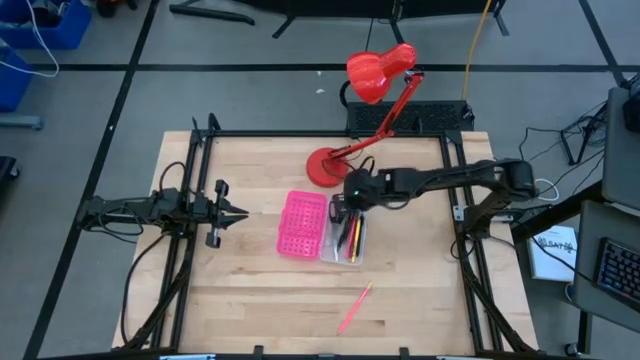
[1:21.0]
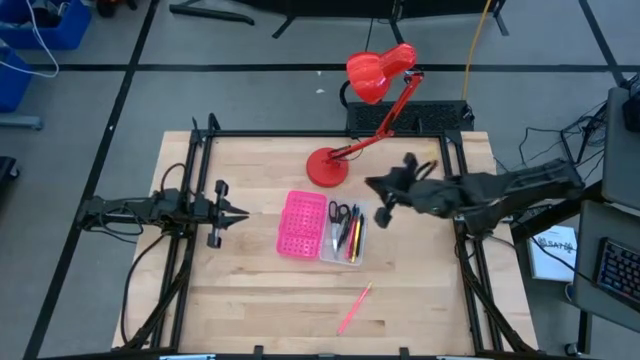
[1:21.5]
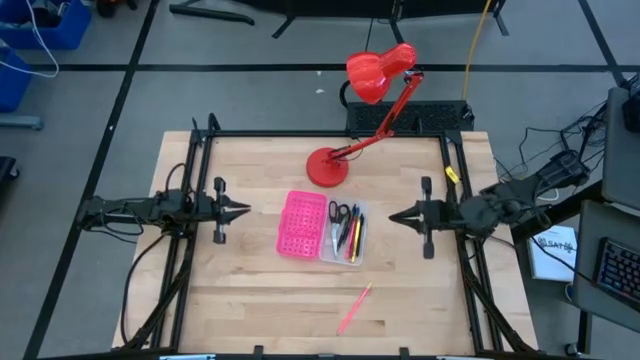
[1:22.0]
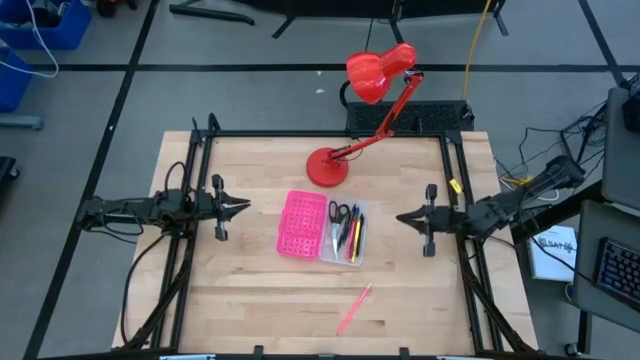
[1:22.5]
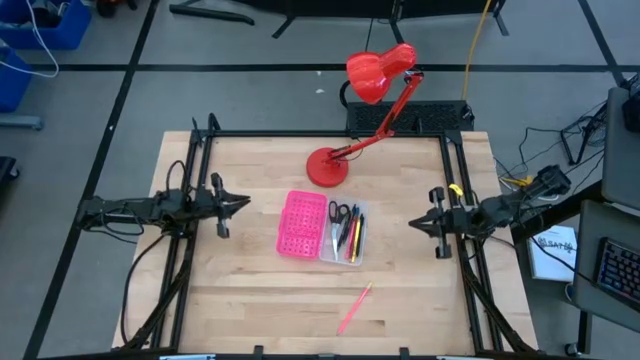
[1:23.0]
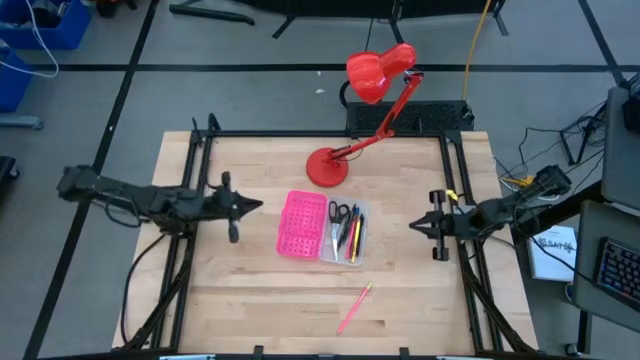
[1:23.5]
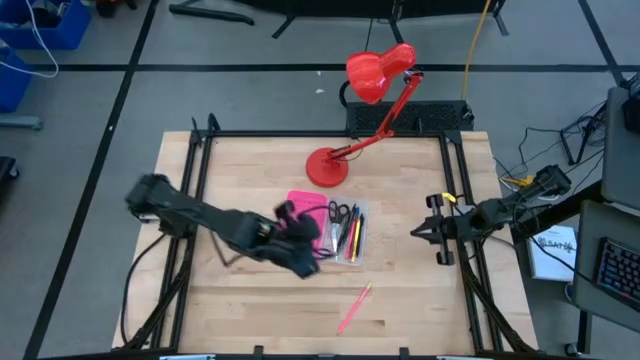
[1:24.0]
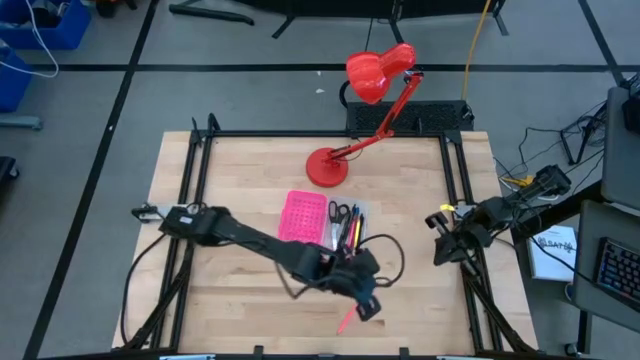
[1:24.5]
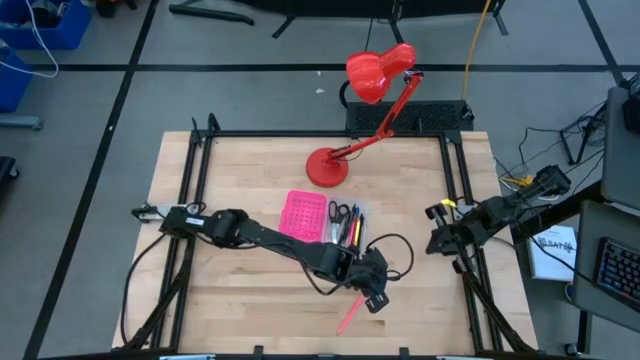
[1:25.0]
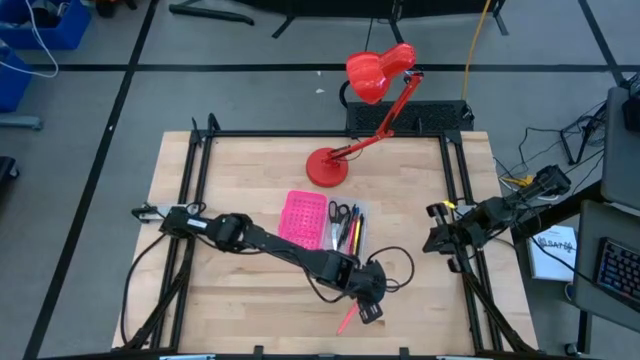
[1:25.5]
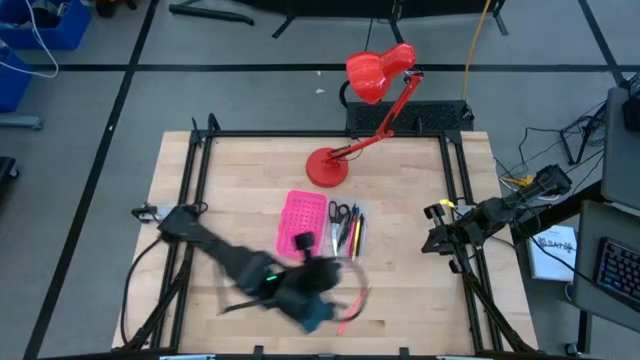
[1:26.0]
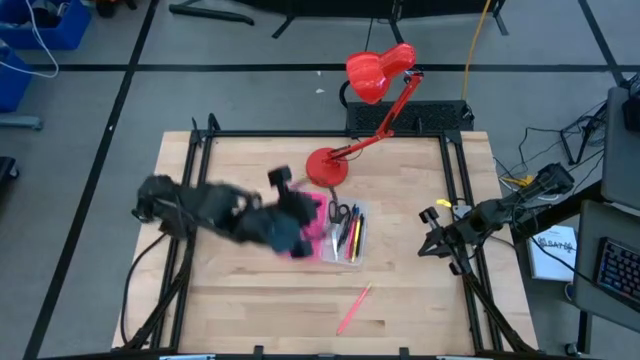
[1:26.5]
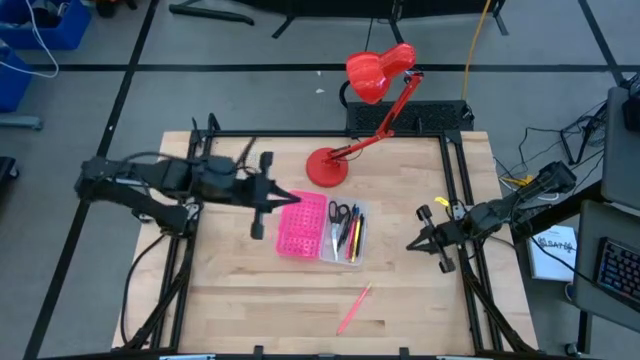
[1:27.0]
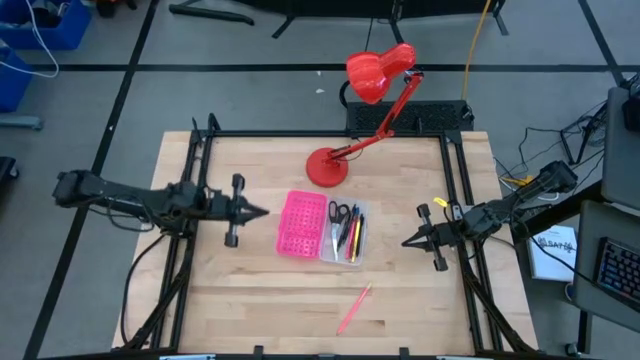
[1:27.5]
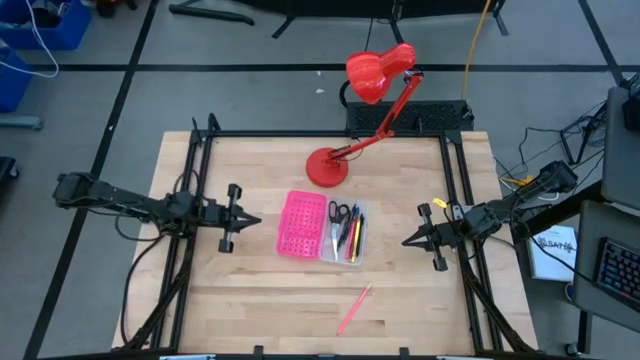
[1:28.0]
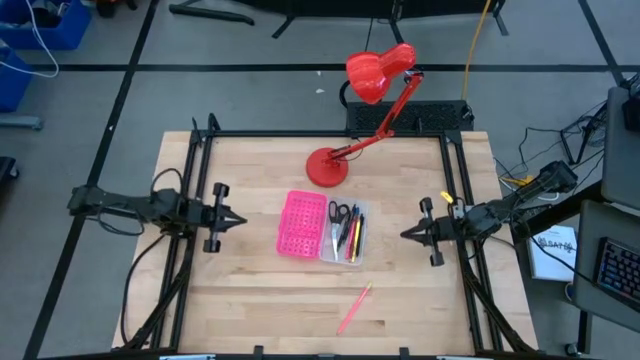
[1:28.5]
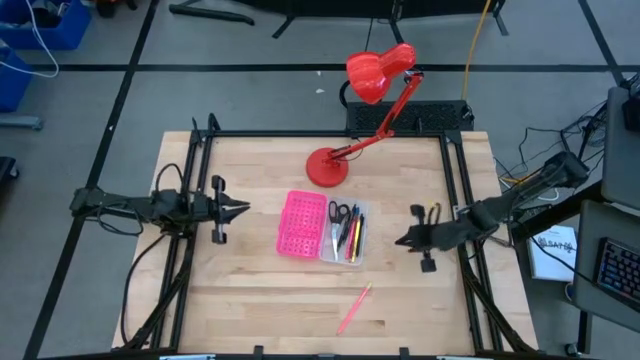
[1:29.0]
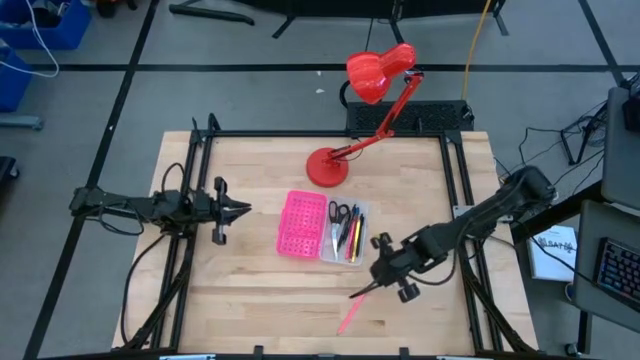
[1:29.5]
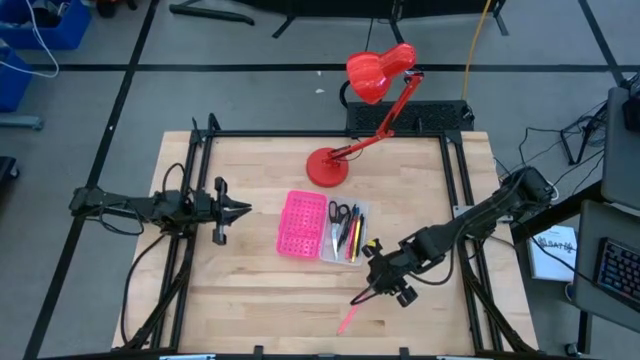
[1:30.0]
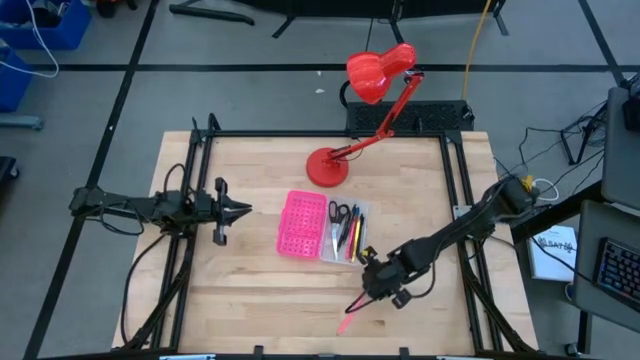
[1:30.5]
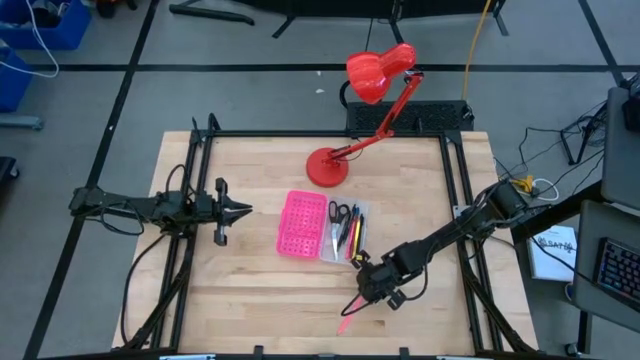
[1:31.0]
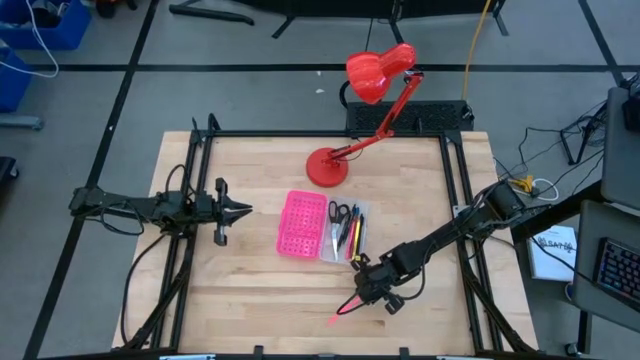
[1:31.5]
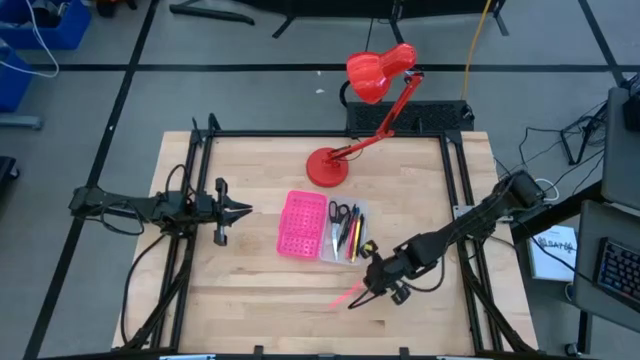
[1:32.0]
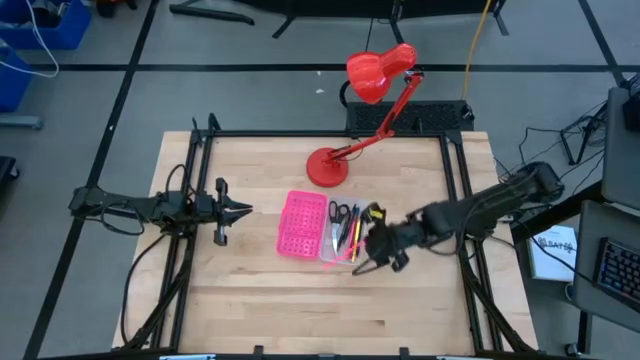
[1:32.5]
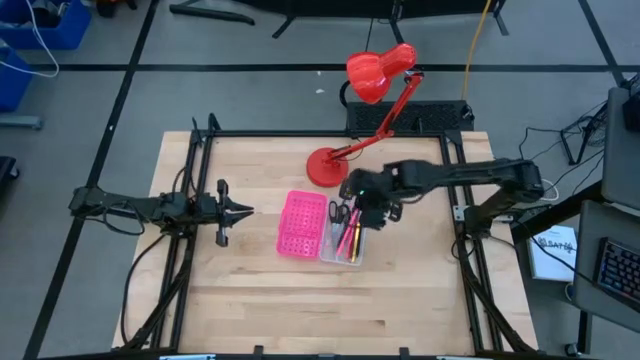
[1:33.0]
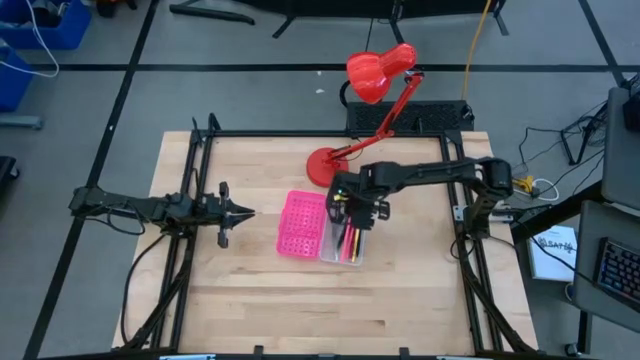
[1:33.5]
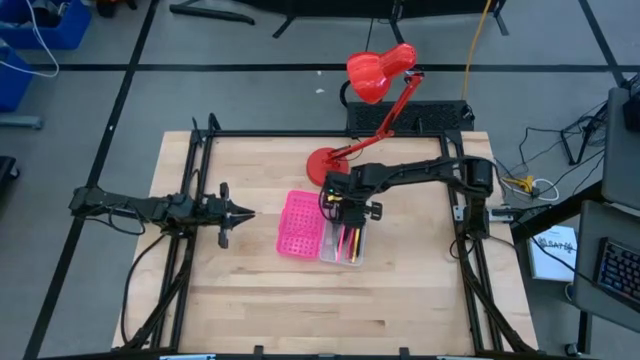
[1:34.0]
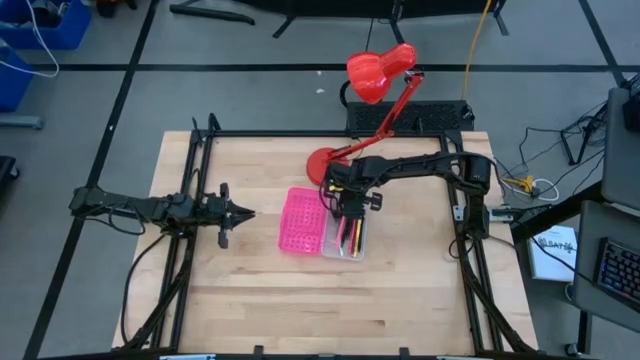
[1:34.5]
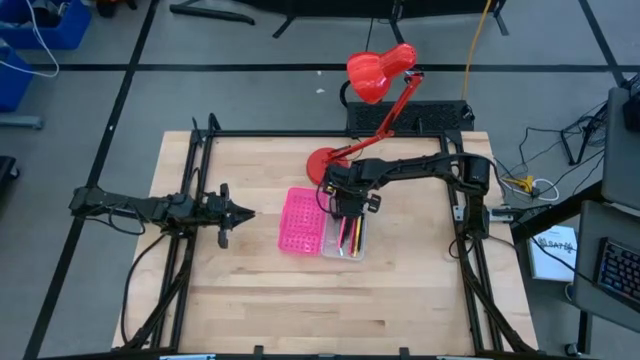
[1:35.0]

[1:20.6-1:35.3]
Task: Pick & place school supplies into a supply box
Put the pink pencil into the pink supply box

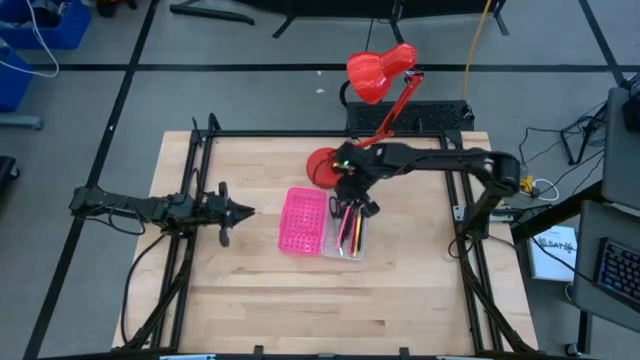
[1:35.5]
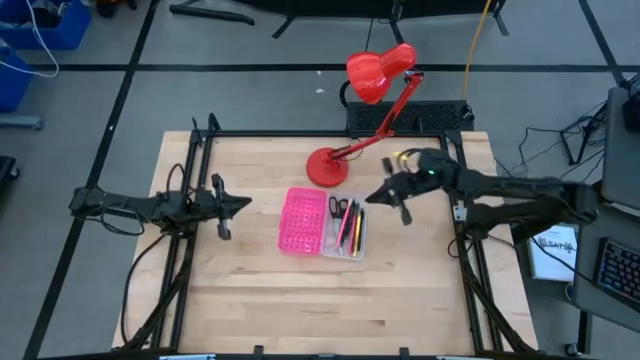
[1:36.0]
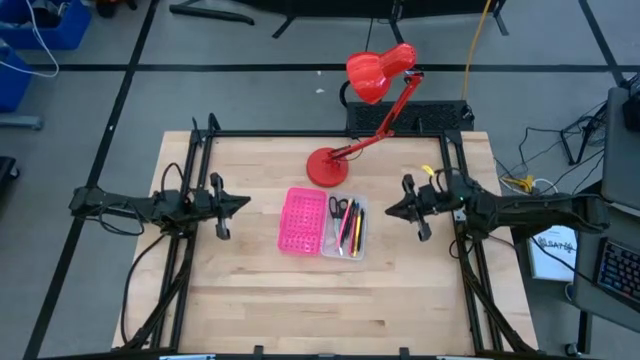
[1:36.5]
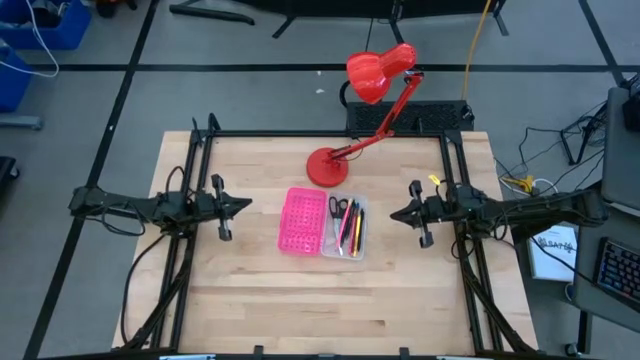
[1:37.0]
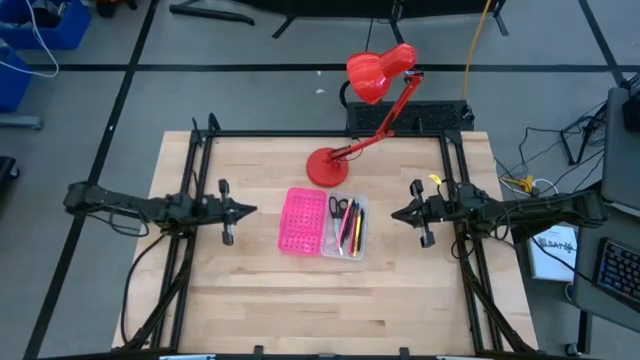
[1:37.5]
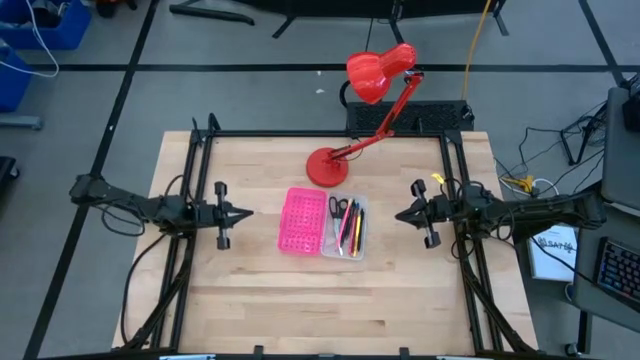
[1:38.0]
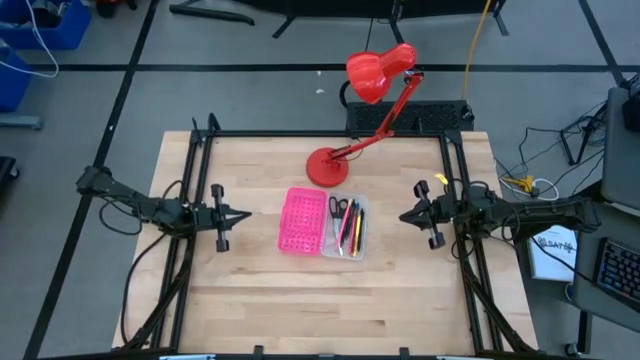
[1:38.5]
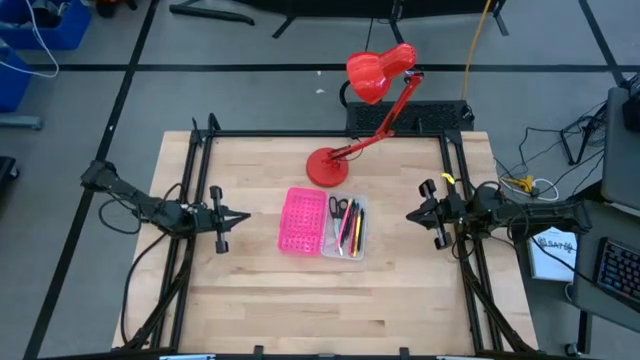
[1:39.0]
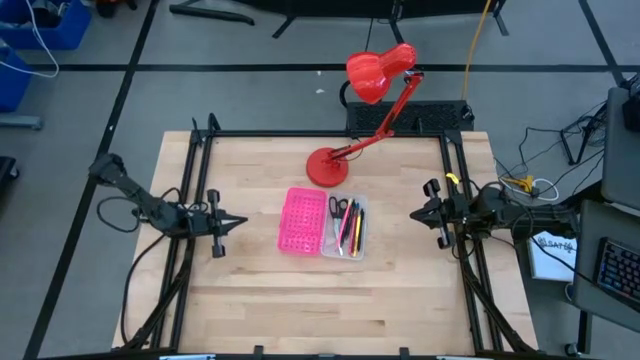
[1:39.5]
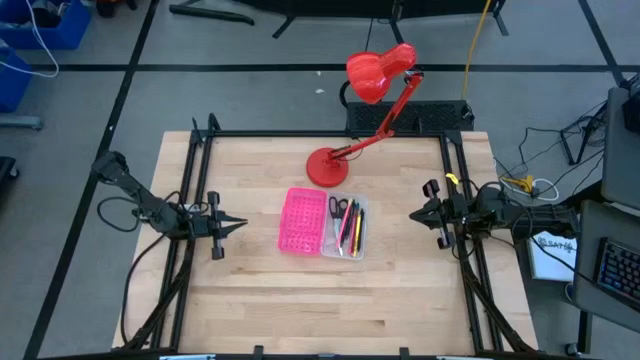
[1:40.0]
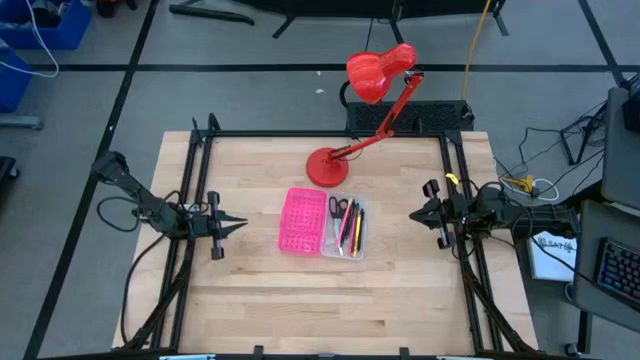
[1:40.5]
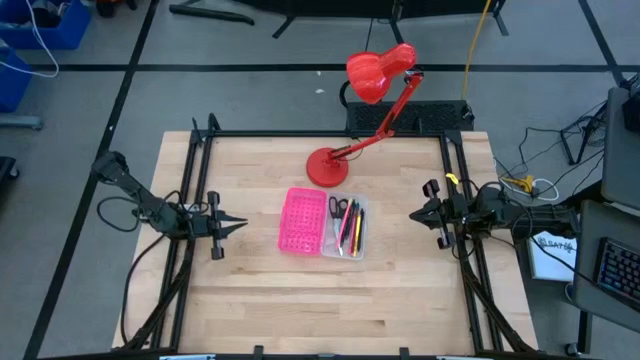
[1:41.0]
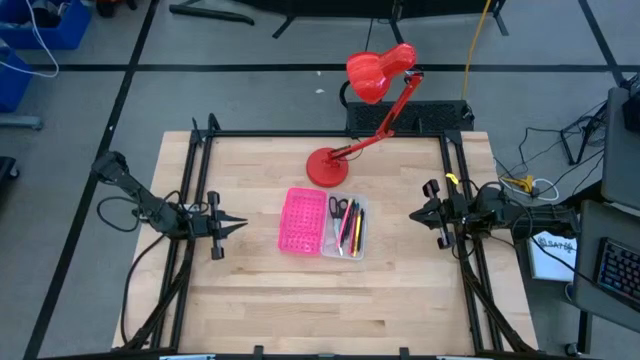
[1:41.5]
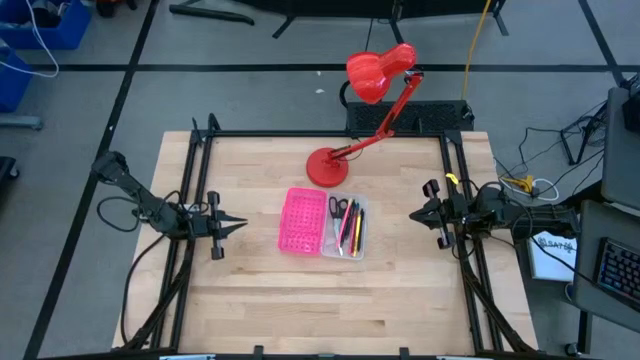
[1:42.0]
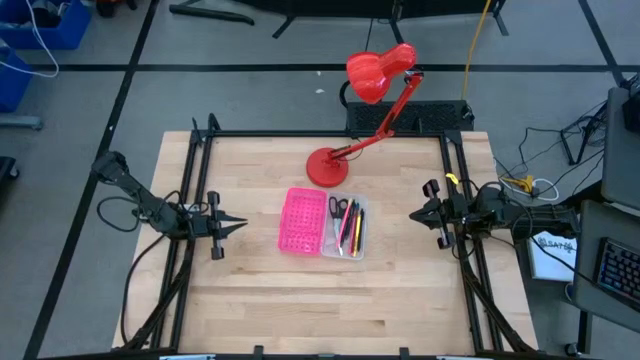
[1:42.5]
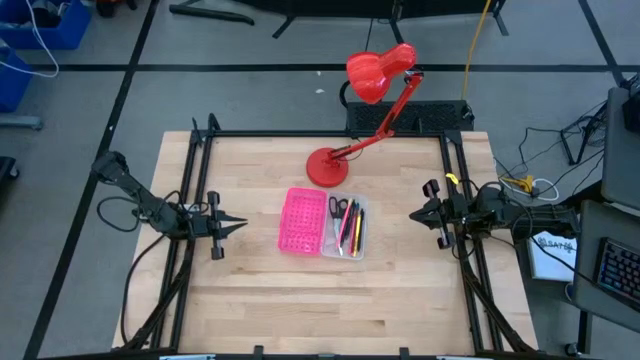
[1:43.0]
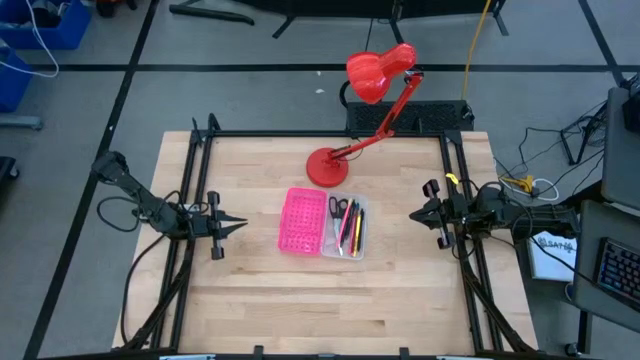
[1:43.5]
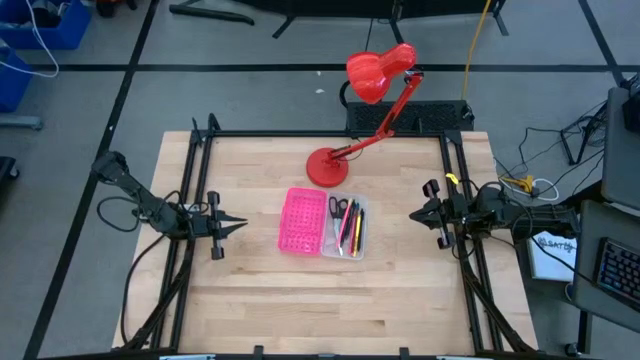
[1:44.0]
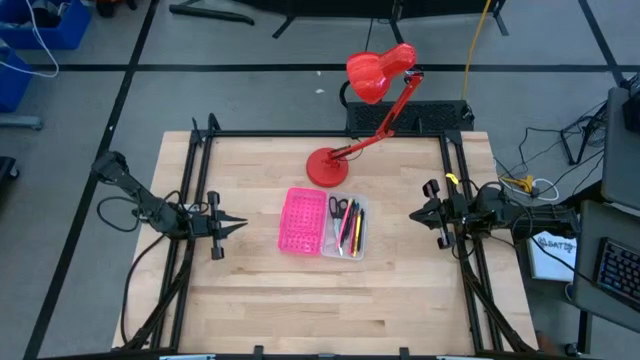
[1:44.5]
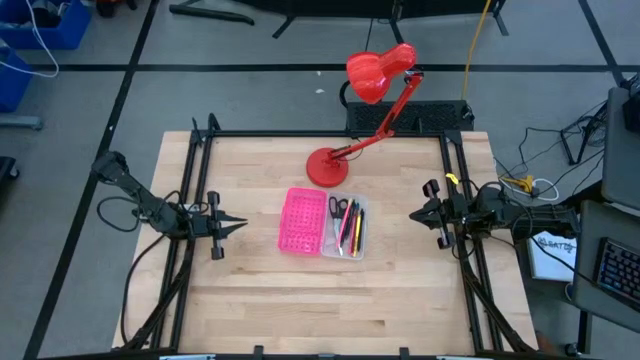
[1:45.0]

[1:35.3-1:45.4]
Return to Home Position
